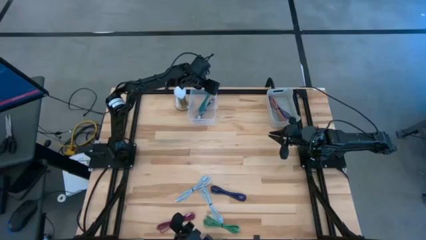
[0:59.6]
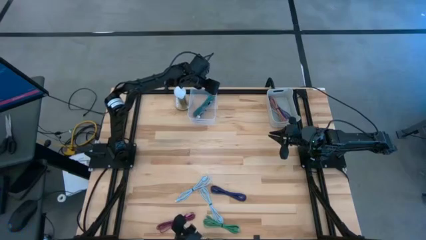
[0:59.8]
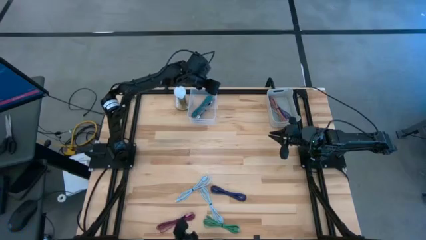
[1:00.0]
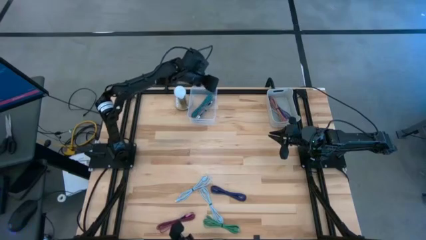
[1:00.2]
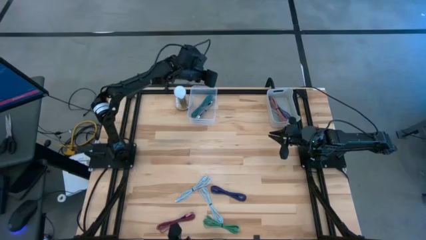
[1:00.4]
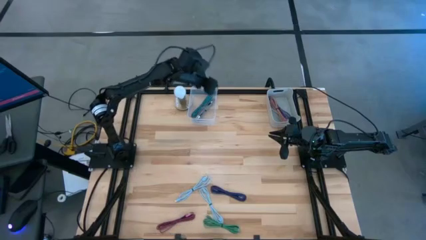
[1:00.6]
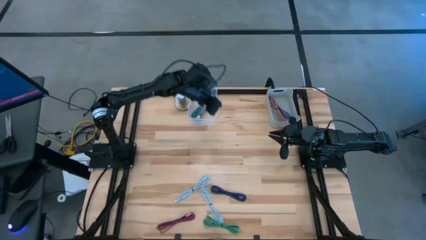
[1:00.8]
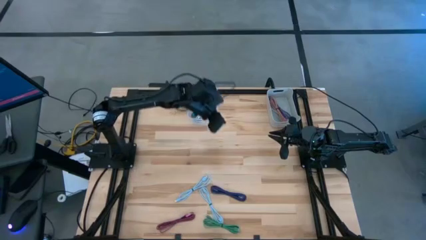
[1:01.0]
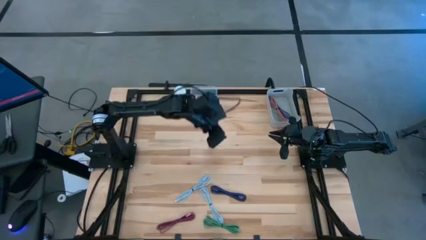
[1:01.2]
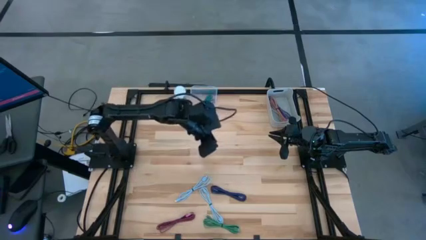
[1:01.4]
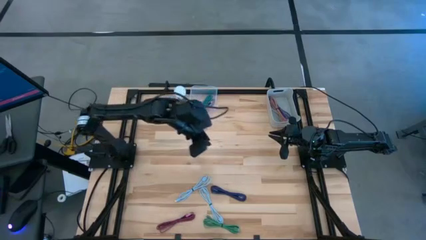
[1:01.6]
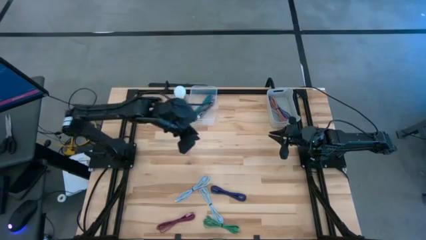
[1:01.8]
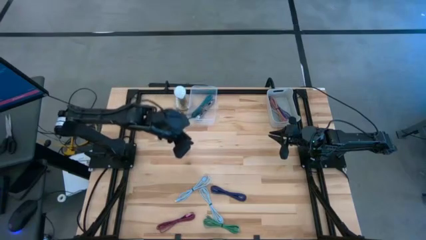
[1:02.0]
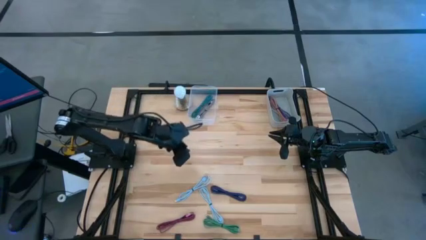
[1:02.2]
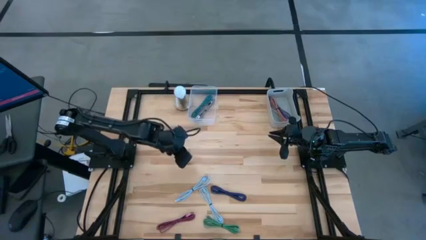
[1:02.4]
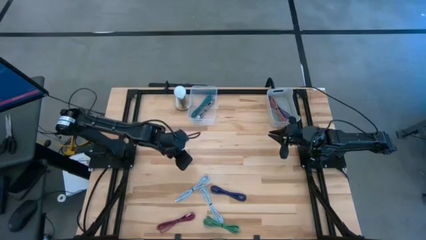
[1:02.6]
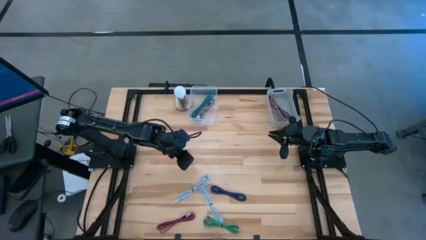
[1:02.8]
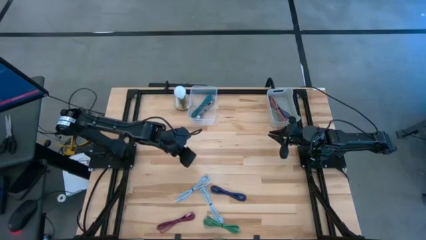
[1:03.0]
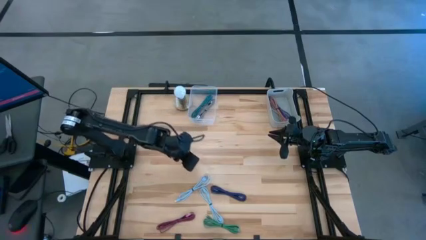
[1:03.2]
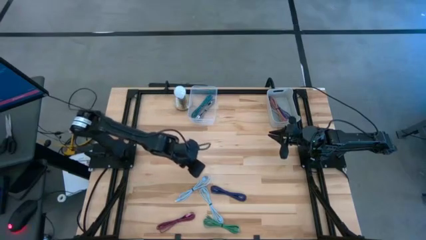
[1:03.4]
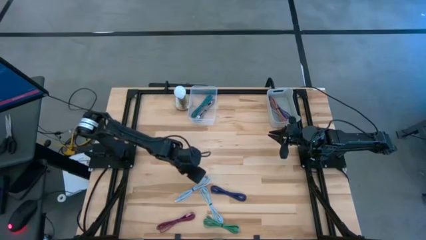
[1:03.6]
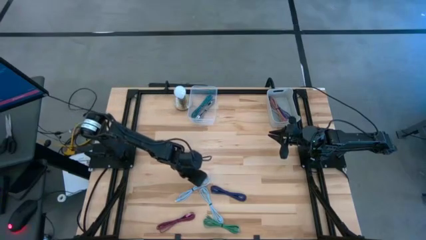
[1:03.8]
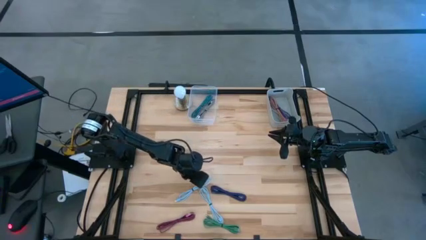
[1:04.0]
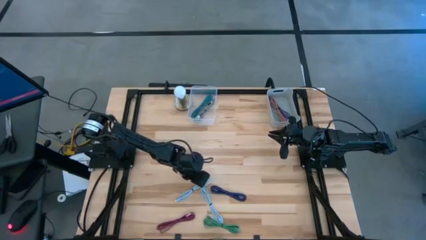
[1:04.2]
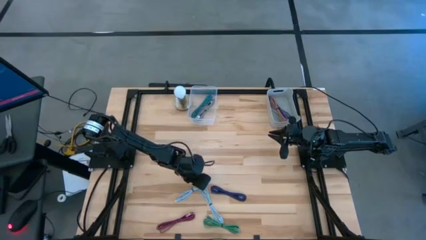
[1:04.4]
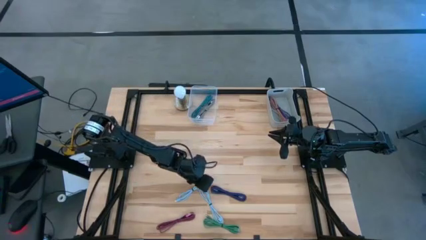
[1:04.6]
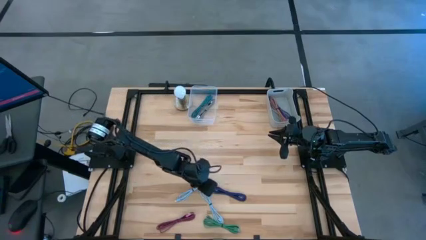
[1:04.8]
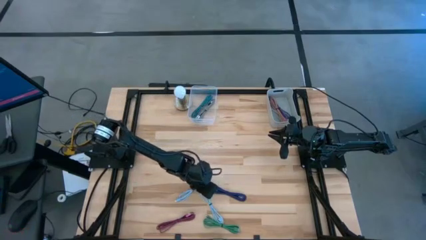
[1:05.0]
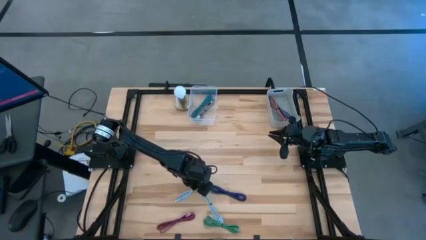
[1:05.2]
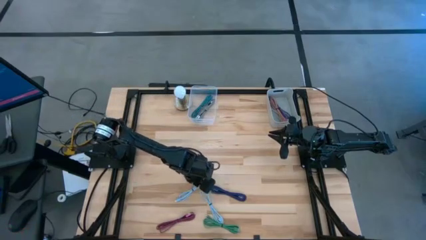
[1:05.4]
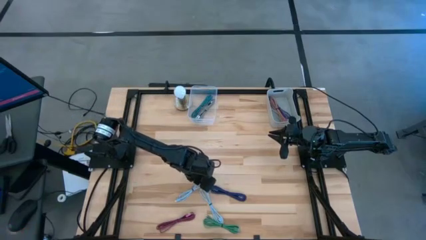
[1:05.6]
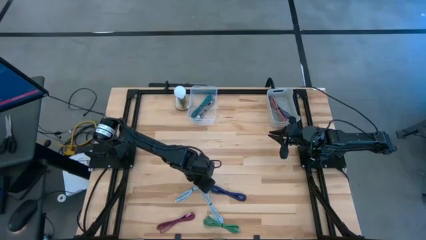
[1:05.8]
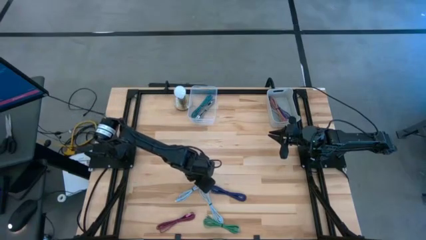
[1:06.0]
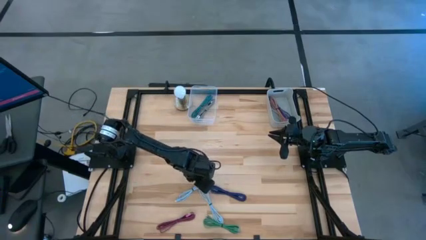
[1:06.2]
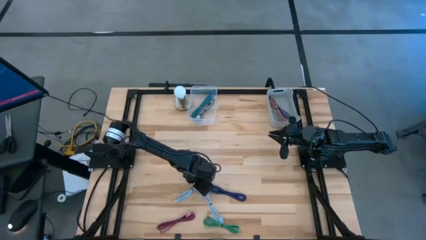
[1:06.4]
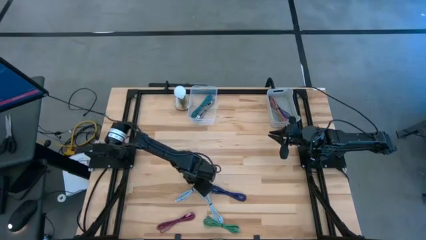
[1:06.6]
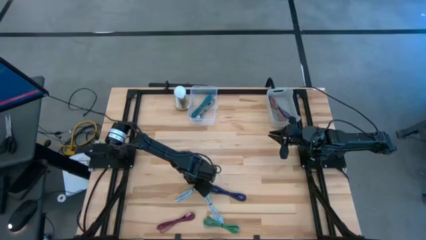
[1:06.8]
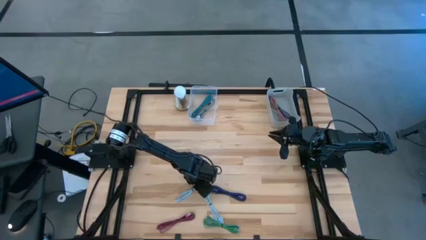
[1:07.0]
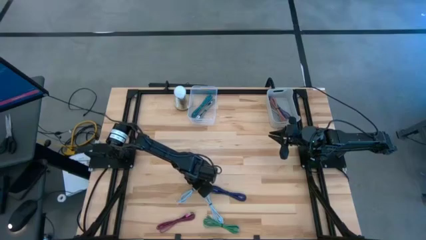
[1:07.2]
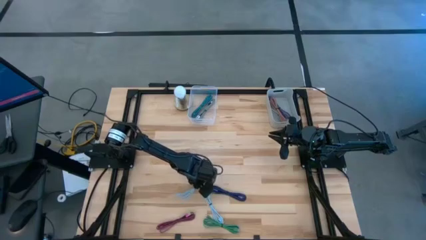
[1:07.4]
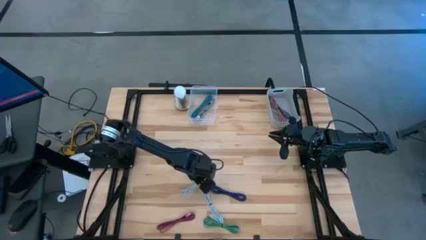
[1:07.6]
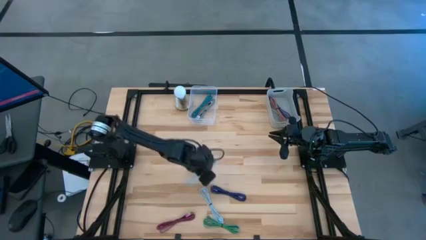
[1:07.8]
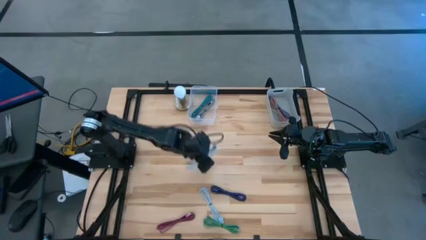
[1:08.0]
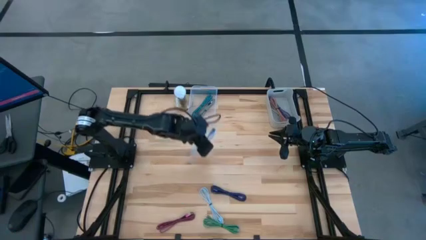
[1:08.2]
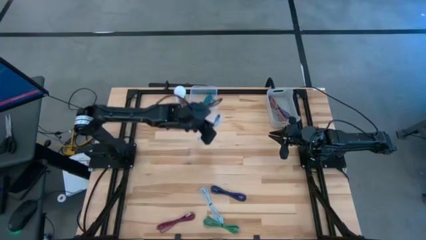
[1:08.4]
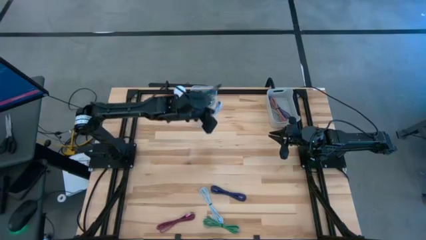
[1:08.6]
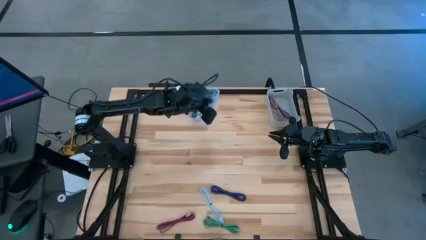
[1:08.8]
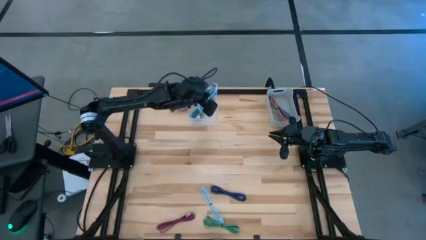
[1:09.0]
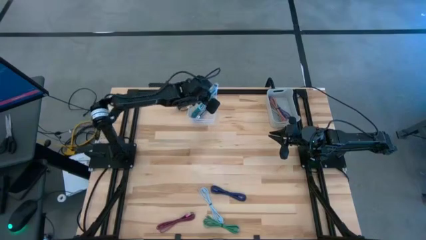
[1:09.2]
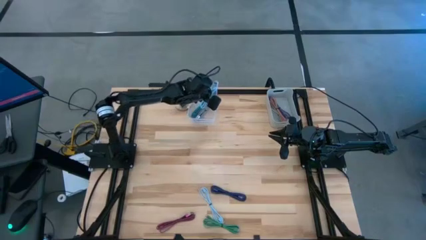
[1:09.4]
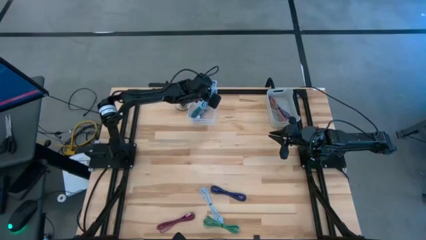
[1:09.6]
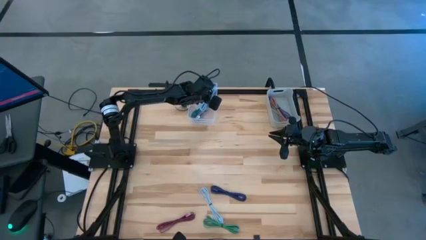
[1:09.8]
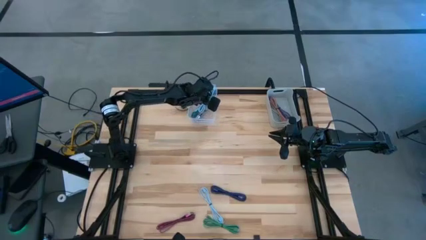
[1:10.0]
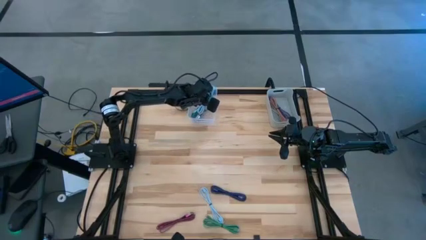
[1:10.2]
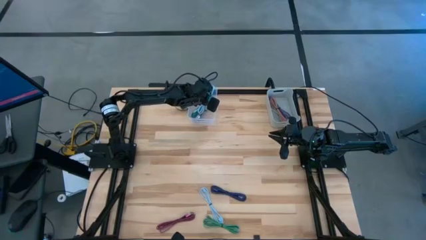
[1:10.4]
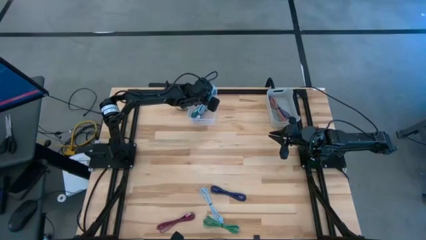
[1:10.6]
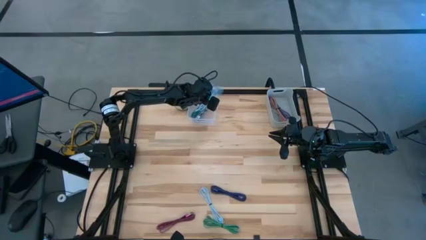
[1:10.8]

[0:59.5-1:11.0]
Task: Pick & Place USB Port
Put the top light blue charger cable into the transparent bin

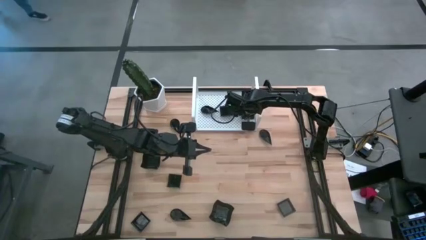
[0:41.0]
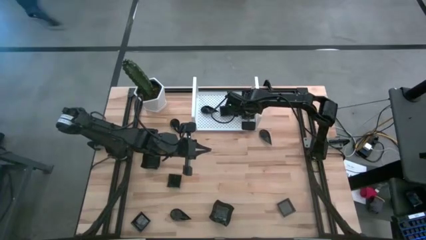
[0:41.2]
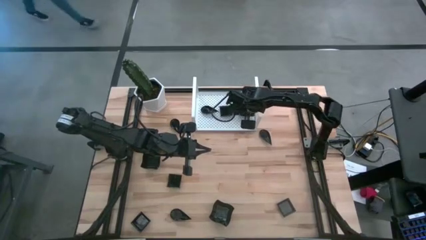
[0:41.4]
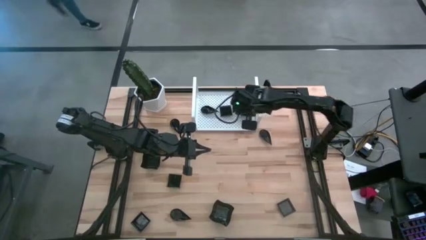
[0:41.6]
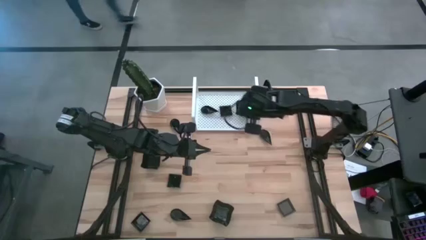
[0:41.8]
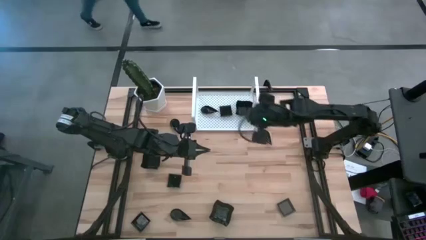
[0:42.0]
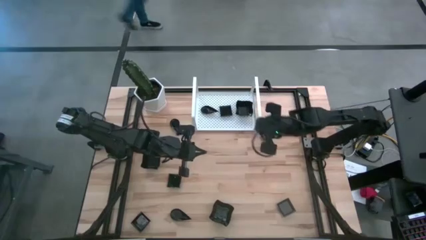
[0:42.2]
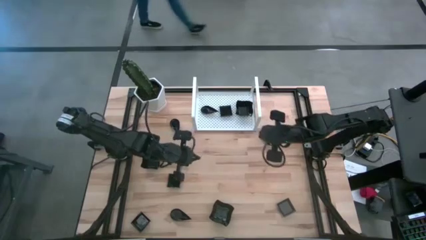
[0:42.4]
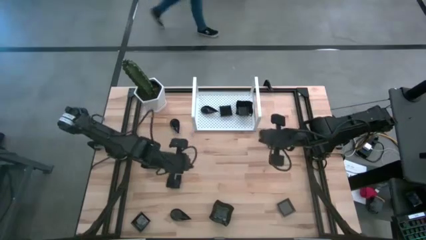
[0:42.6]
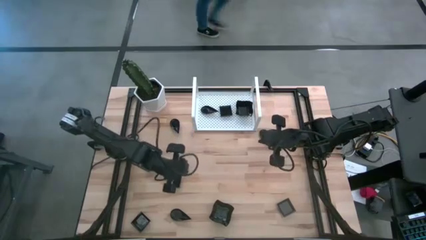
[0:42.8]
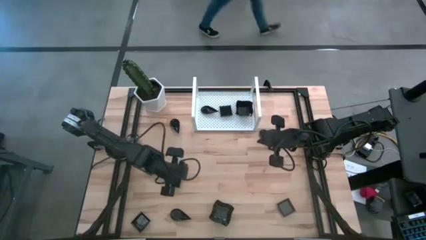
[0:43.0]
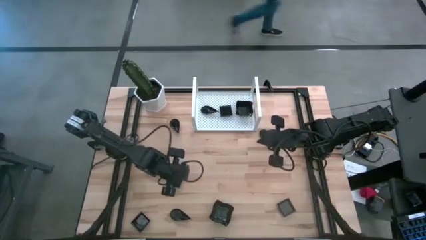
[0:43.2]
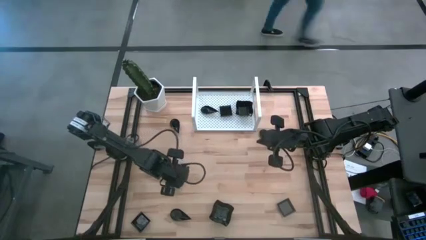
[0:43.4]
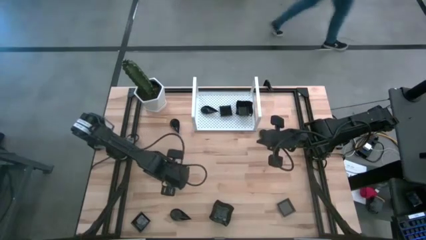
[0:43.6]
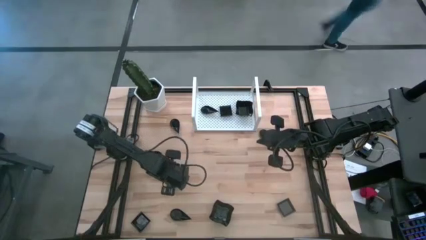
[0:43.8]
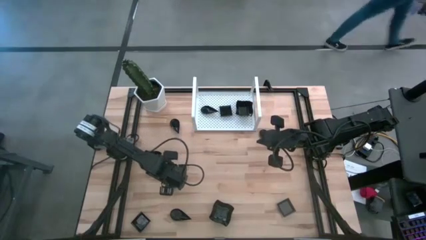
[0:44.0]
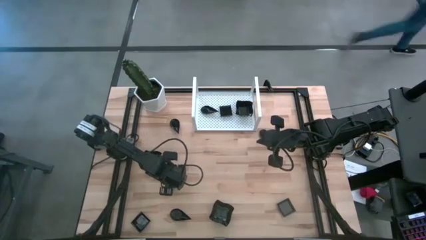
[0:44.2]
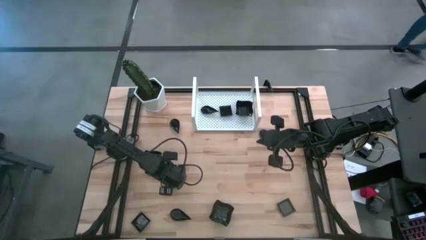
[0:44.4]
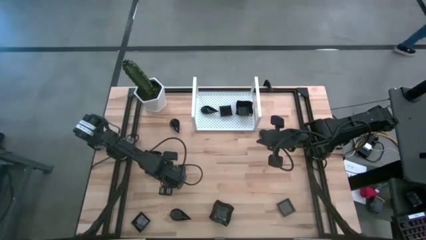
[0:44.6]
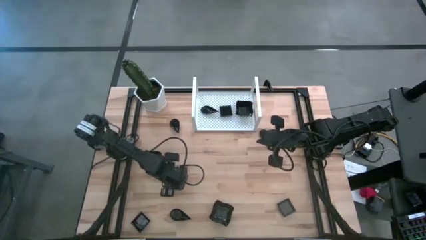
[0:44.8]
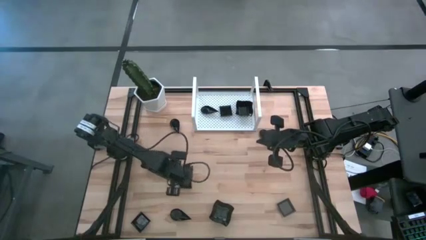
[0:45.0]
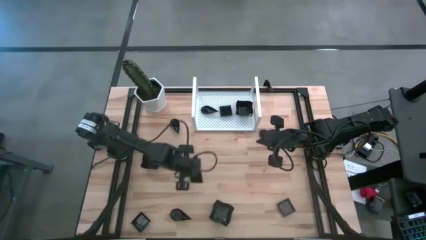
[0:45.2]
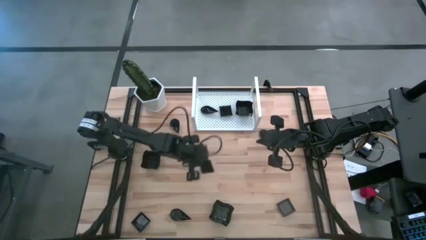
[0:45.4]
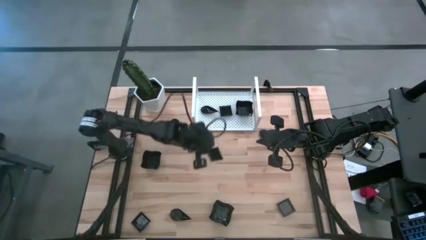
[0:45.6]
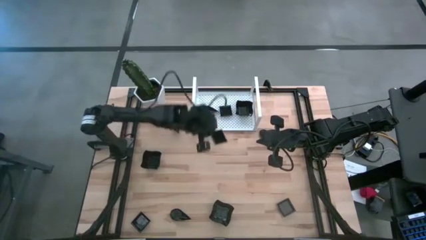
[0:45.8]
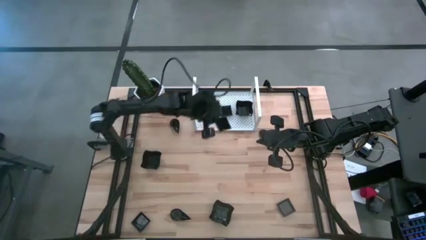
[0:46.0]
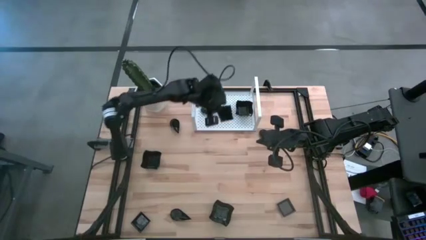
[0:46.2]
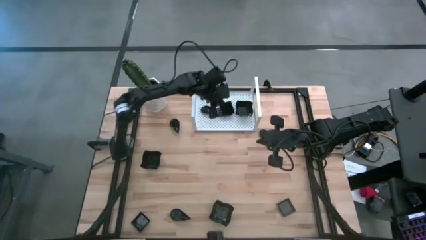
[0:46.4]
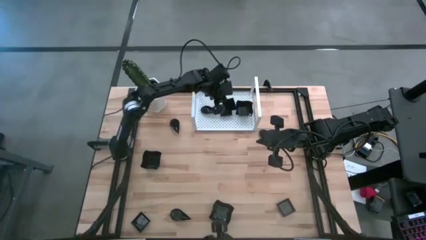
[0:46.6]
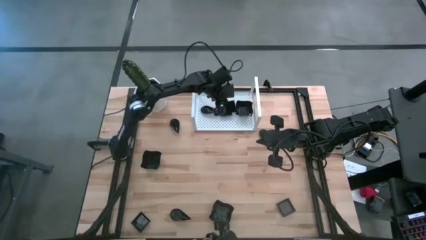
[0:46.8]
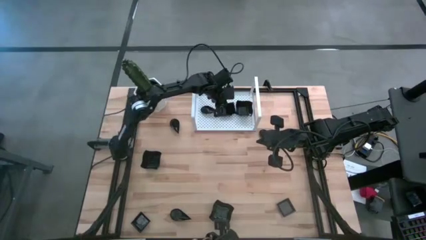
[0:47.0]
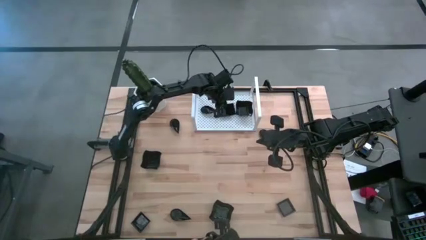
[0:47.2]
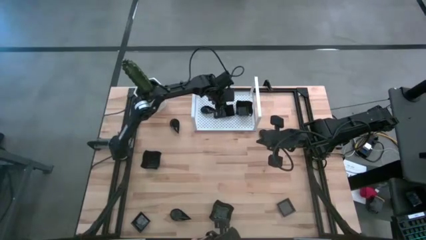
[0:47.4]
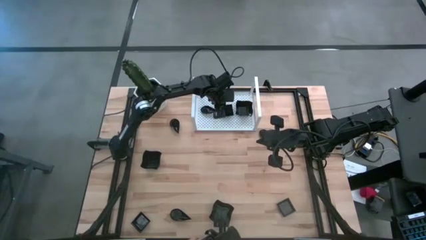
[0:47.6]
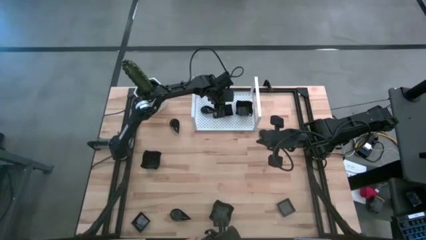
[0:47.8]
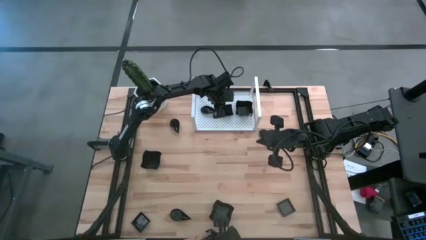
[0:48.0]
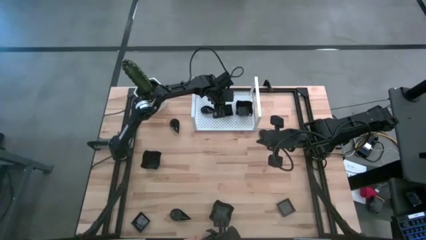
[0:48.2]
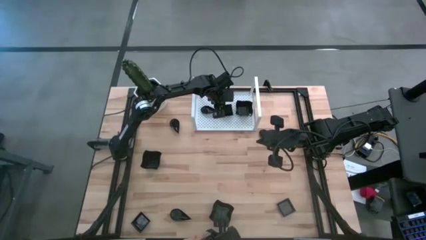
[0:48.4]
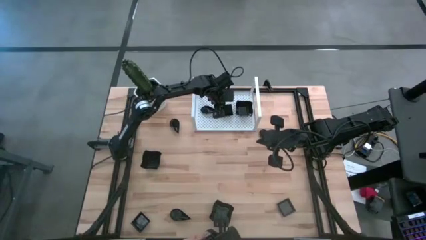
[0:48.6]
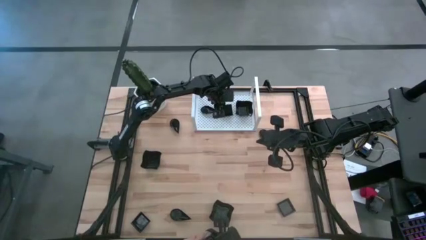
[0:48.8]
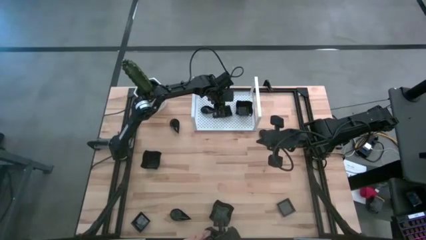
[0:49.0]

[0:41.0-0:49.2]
Task: Pick & Place Mini shaped plates
Stack the black square plate on top of the black square plate on the shelf
